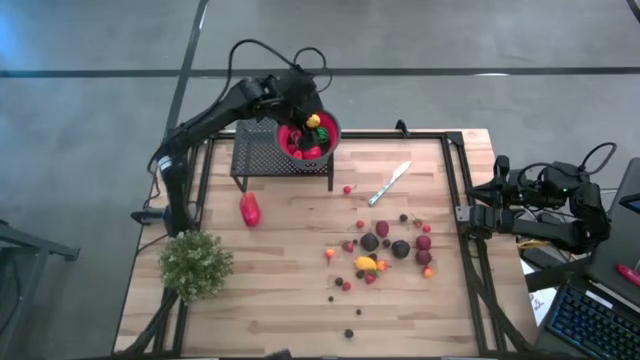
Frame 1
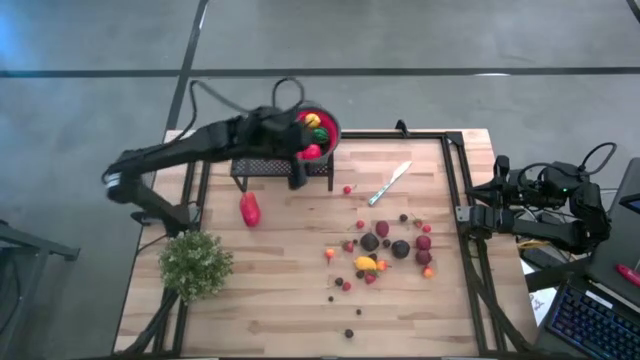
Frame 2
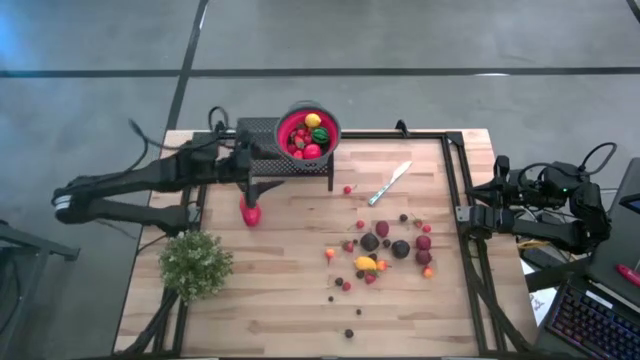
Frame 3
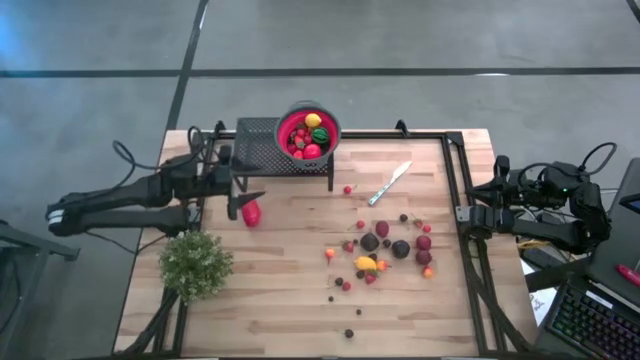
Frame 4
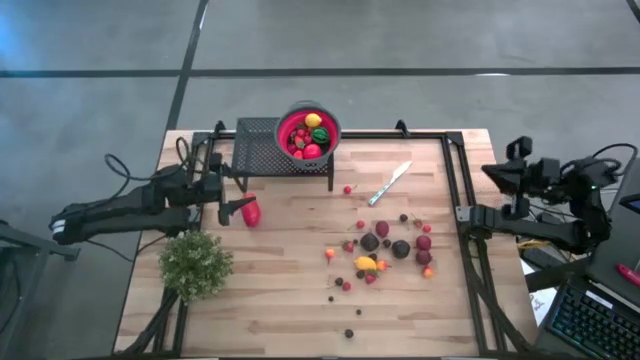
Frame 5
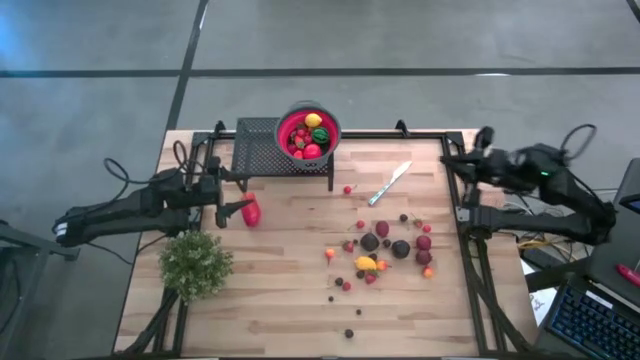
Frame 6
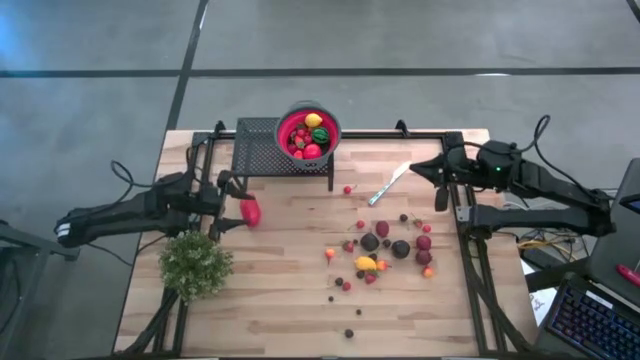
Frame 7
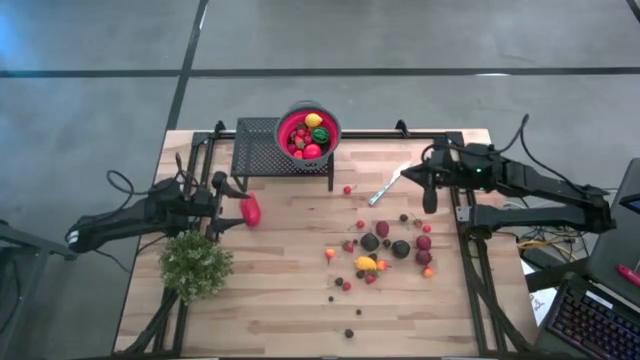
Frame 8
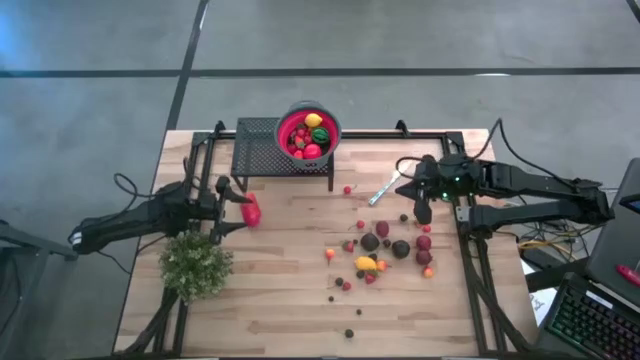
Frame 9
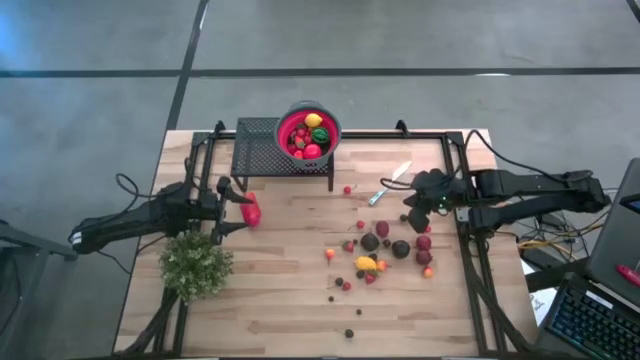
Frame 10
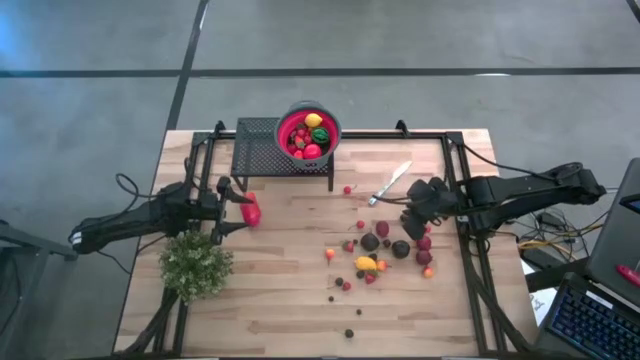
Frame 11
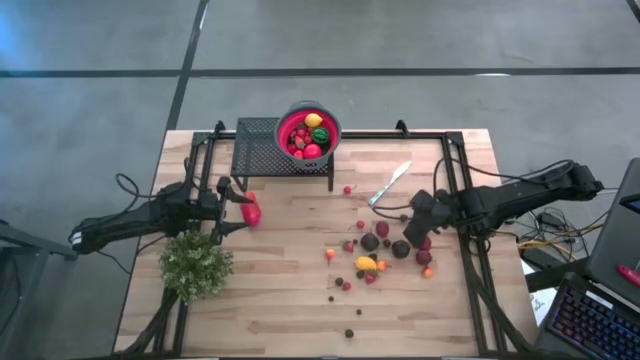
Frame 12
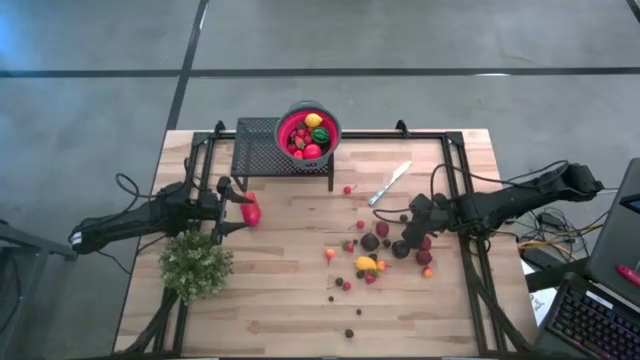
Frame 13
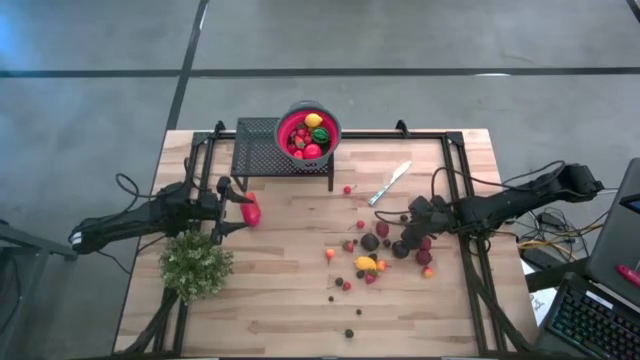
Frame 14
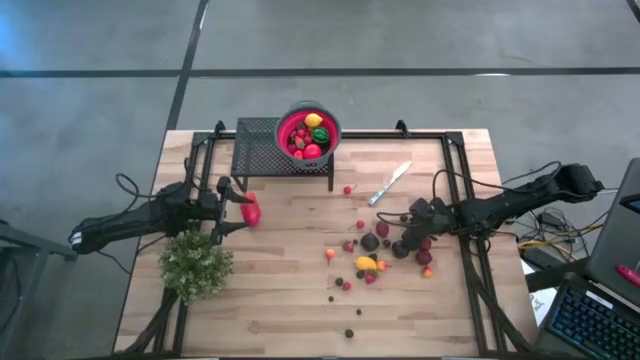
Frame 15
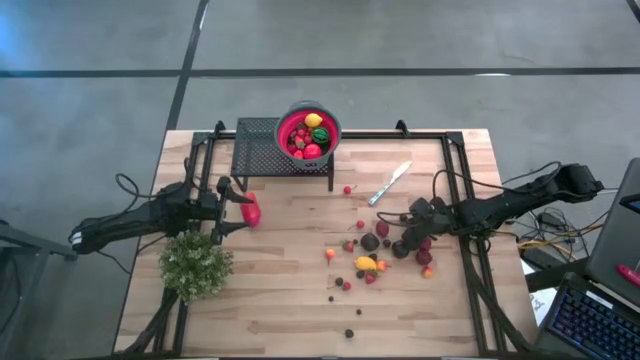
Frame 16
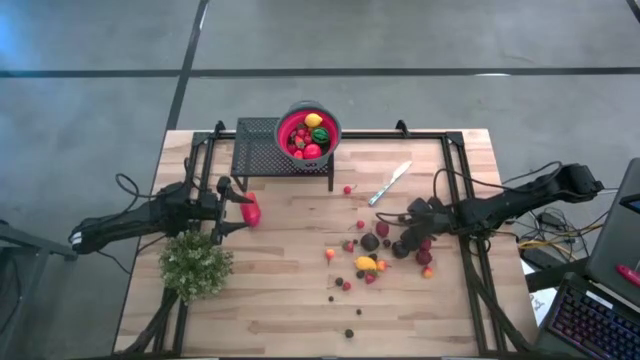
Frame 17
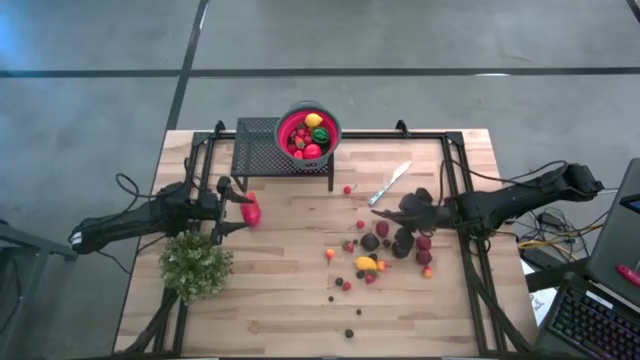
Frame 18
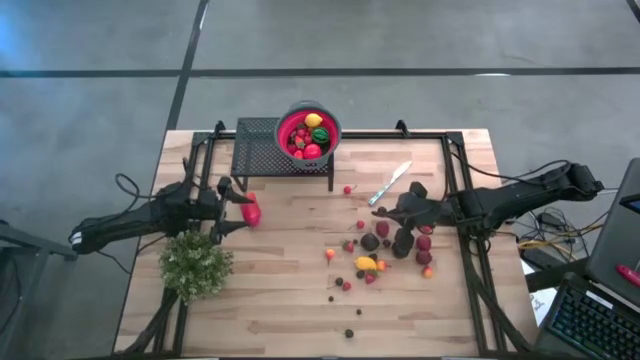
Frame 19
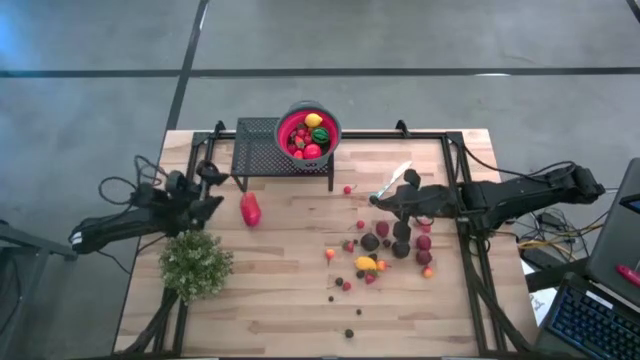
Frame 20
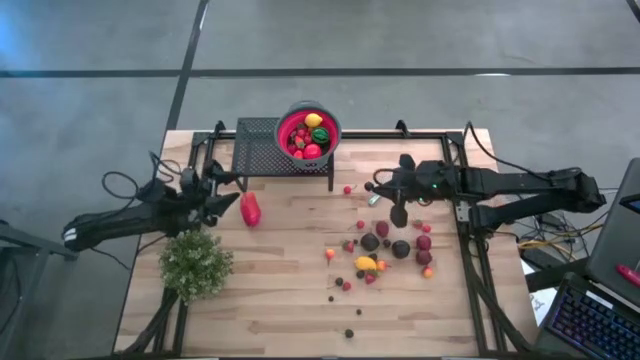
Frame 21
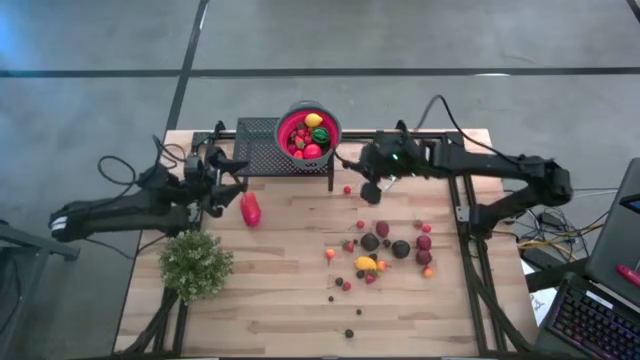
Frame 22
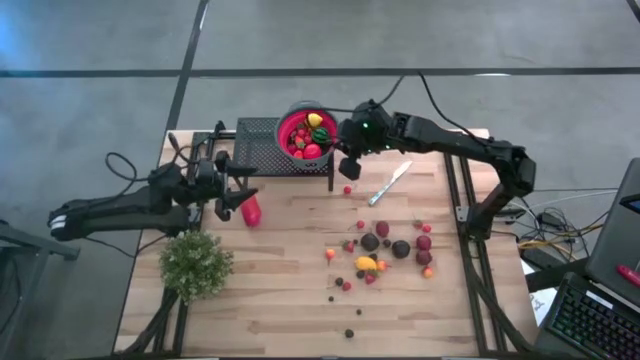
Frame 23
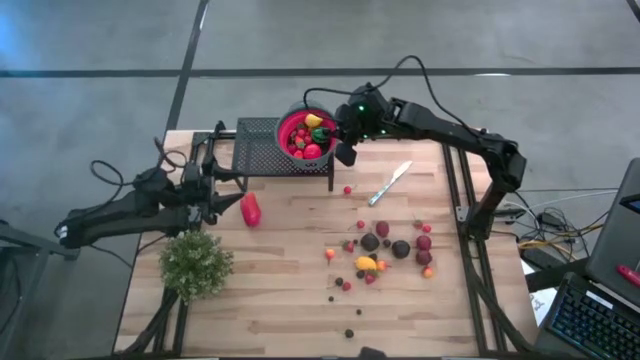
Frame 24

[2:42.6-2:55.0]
Task: Pick & Place Fruit
Put the black cherry into the red gray strainer bowl on the shelf

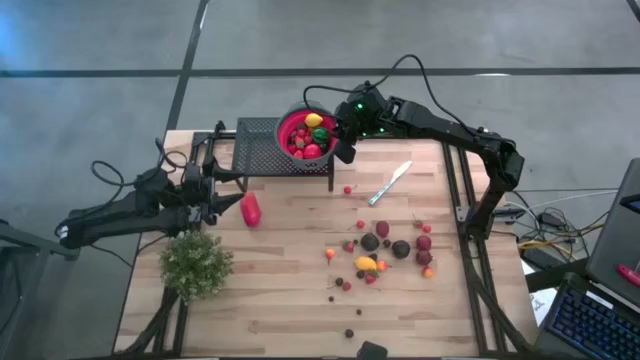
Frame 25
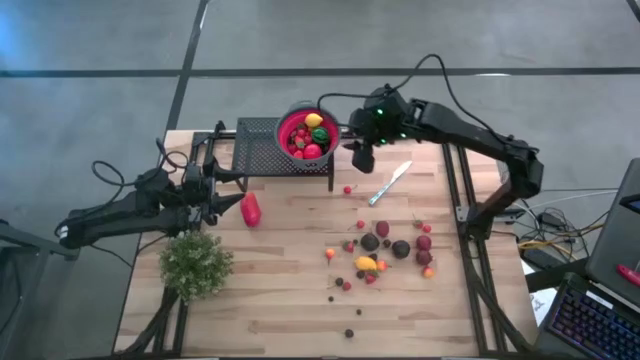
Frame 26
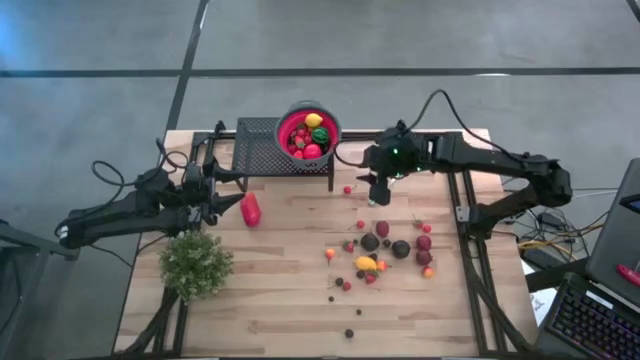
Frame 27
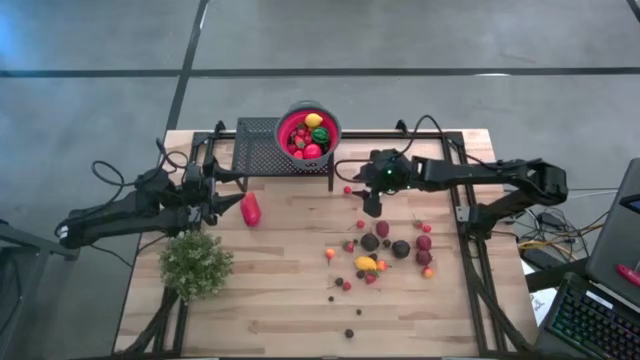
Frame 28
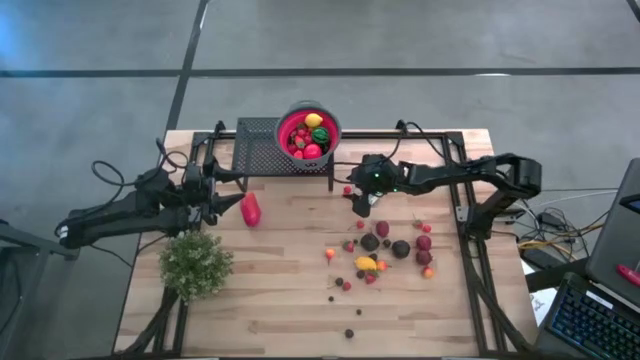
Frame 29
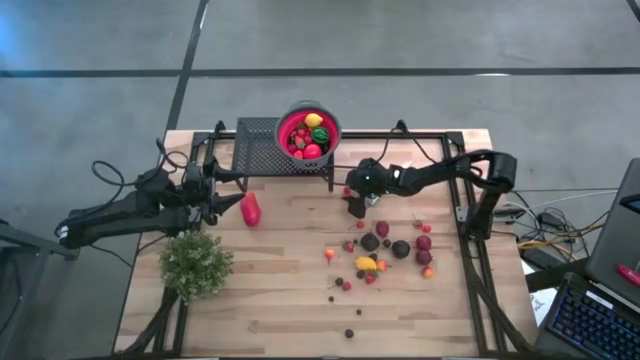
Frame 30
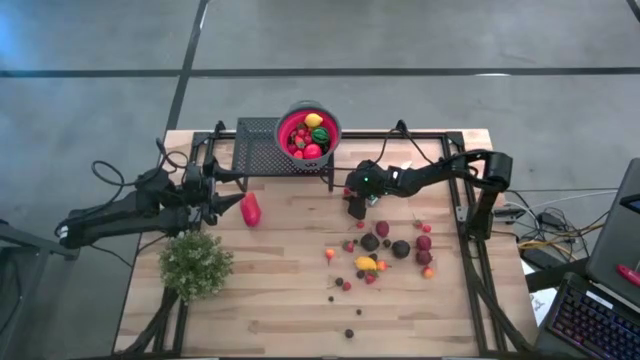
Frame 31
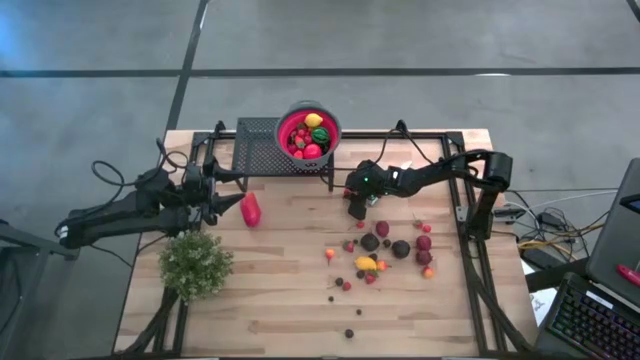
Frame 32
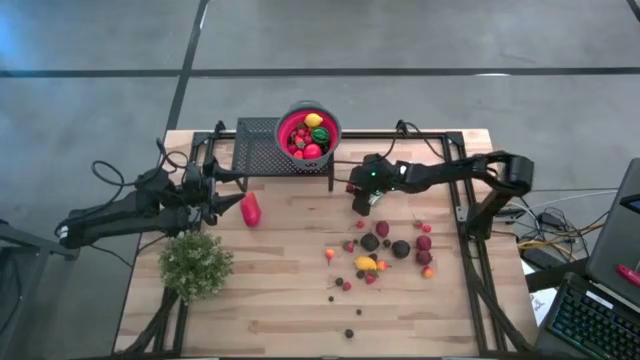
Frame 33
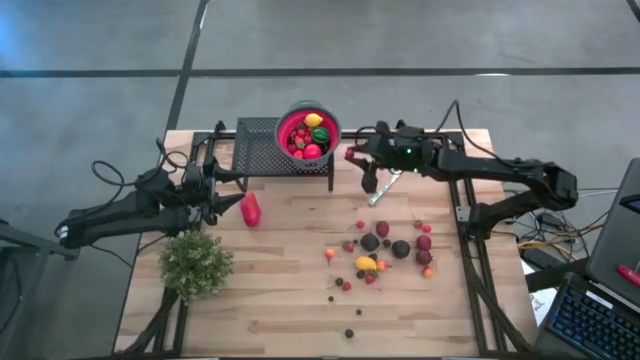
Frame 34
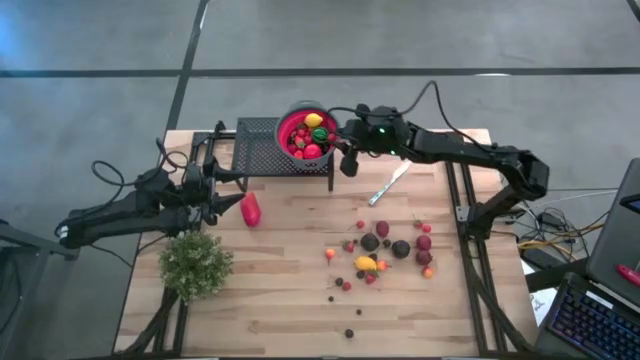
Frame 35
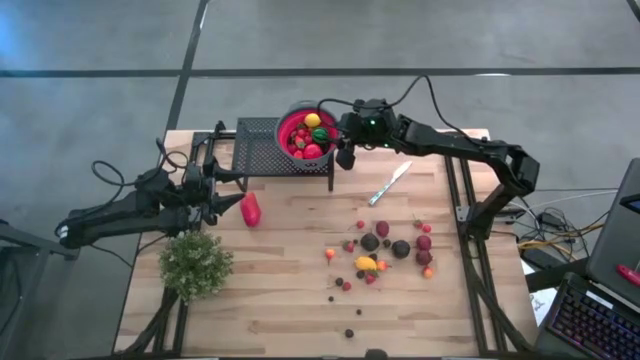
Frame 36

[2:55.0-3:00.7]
Put the red cherry into the red gray strainer bowl on the shelf

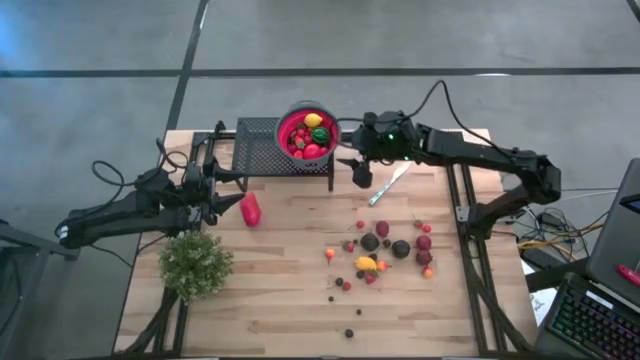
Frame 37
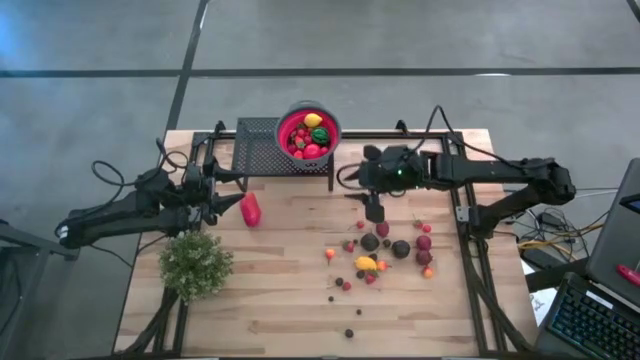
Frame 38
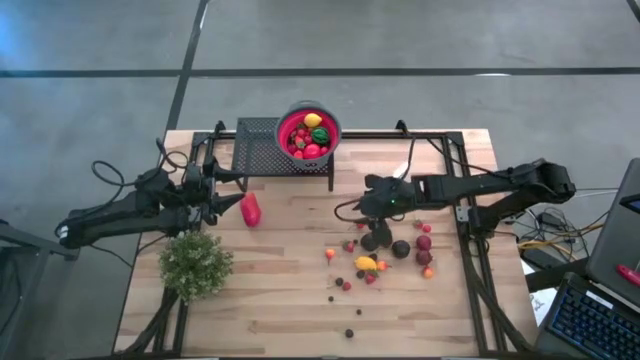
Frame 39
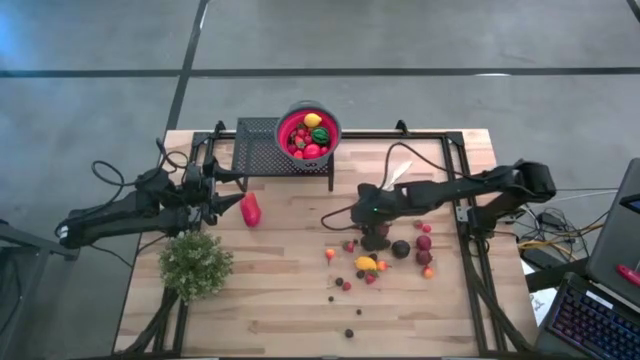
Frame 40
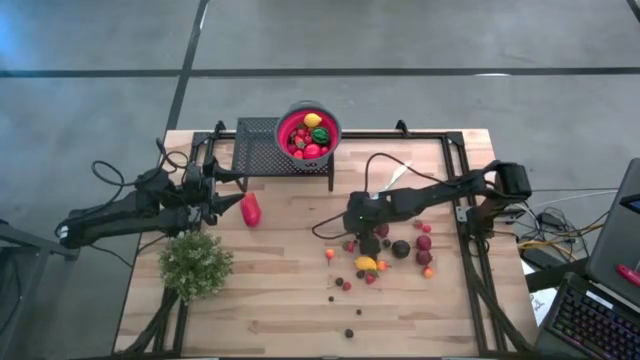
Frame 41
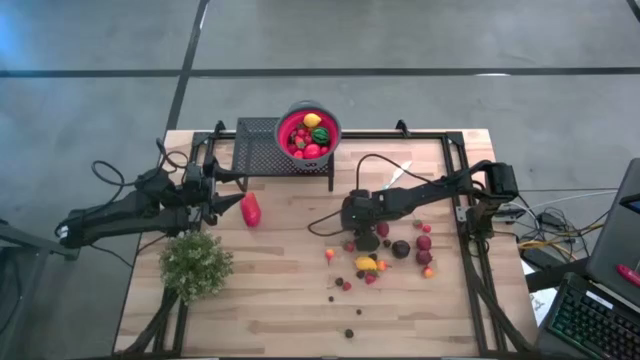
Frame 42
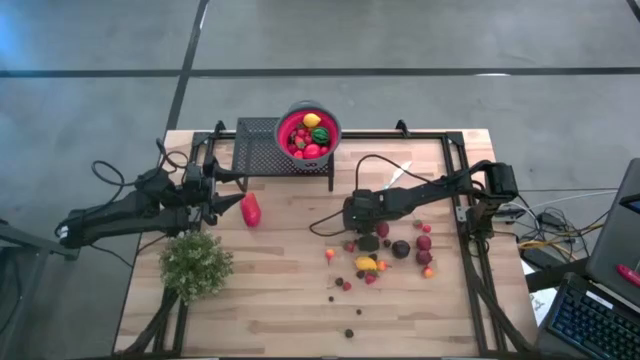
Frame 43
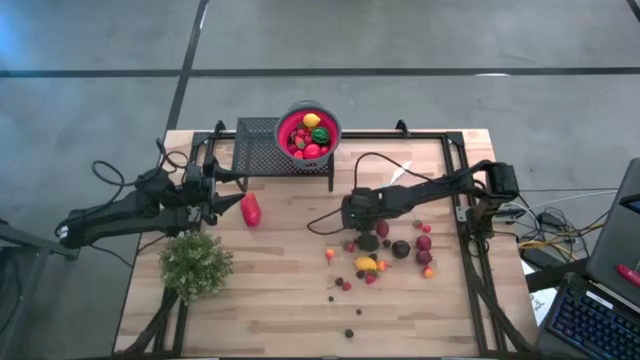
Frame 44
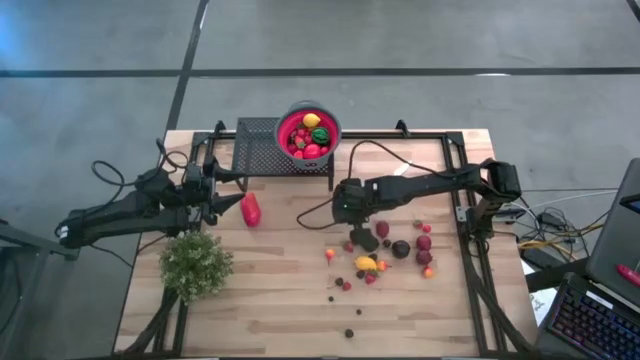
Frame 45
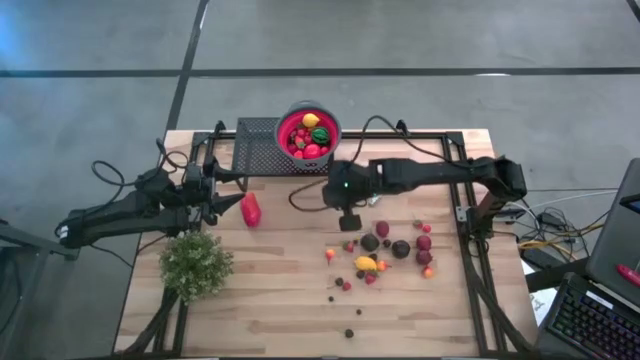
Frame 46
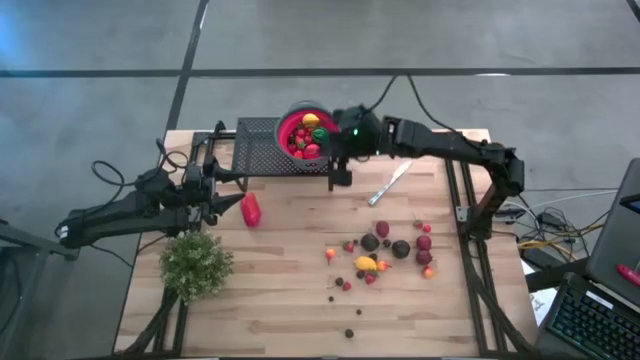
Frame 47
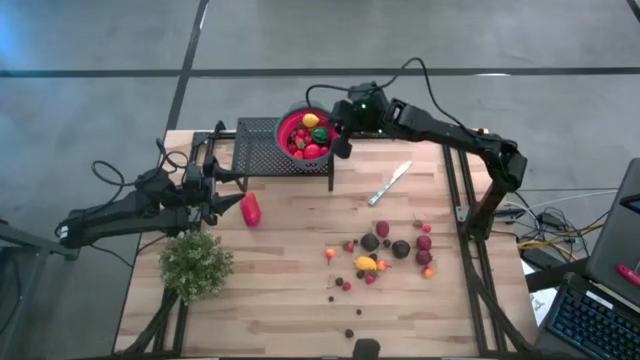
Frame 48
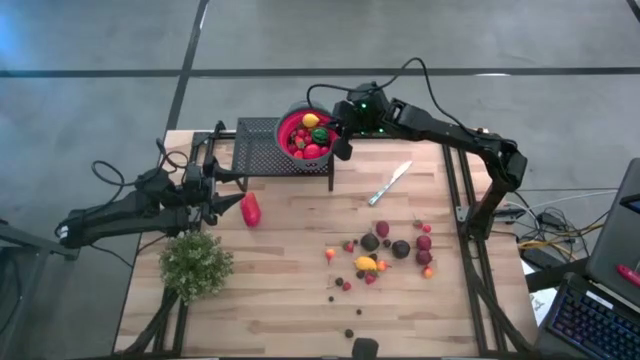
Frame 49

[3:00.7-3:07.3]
Put the red cherry into the red gray strainer bowl on the shelf
